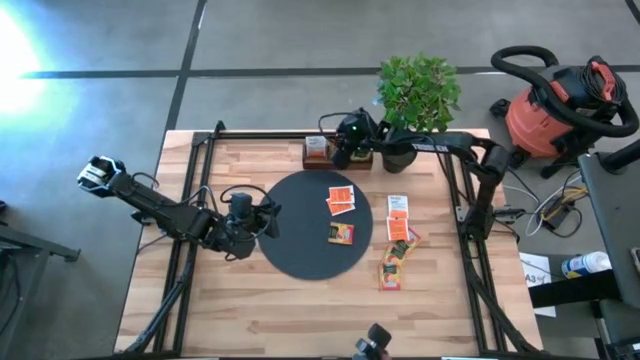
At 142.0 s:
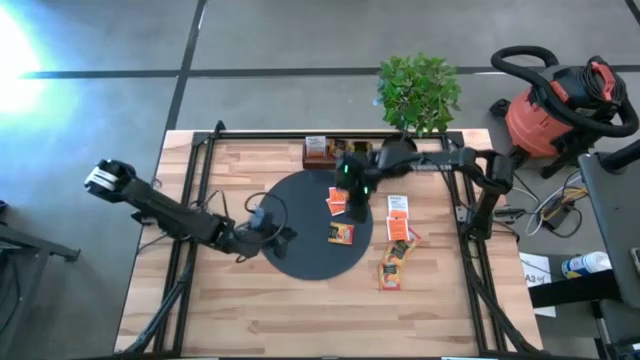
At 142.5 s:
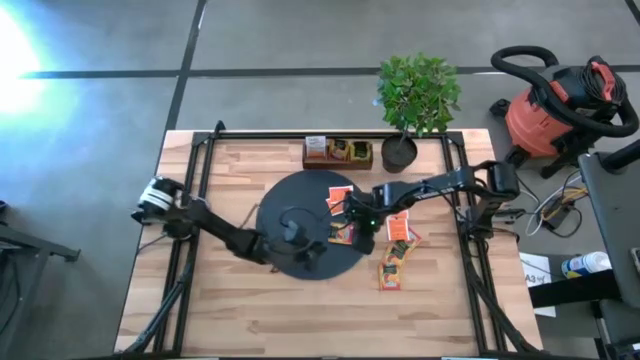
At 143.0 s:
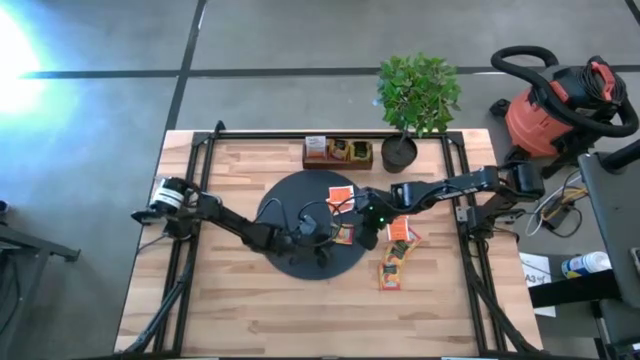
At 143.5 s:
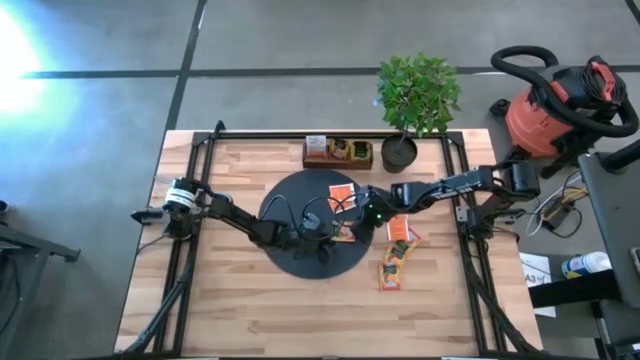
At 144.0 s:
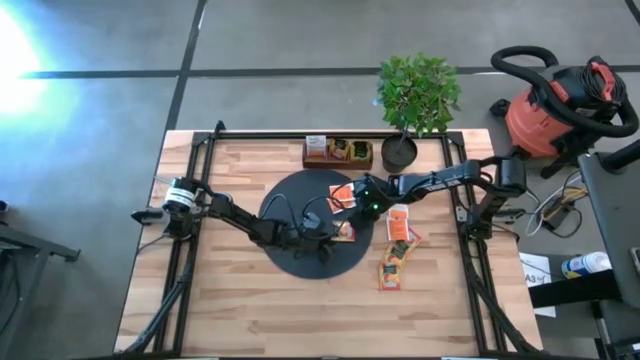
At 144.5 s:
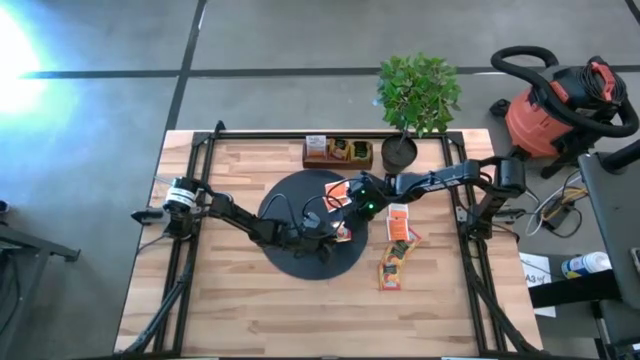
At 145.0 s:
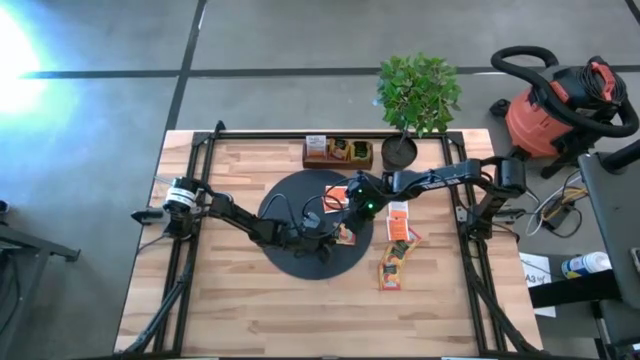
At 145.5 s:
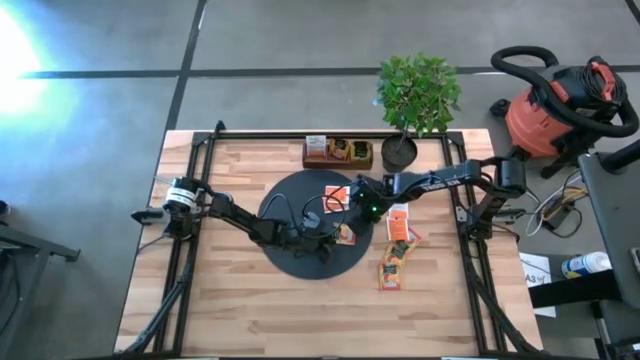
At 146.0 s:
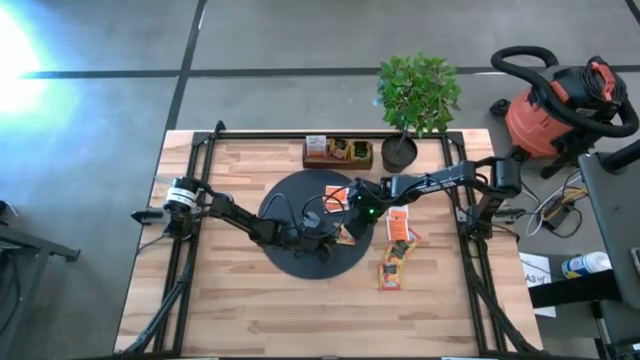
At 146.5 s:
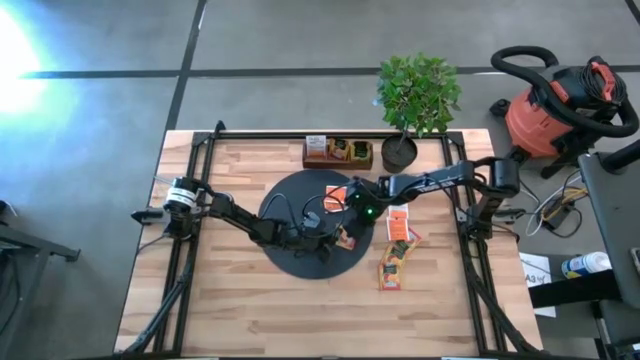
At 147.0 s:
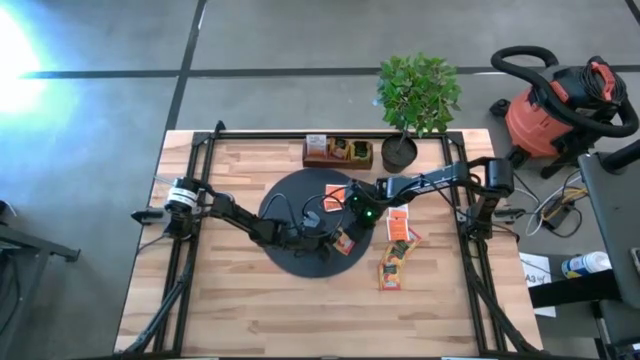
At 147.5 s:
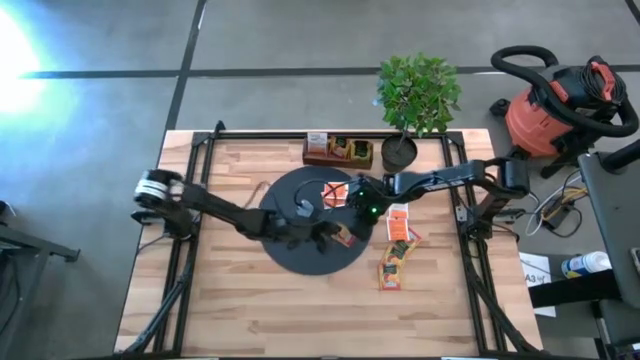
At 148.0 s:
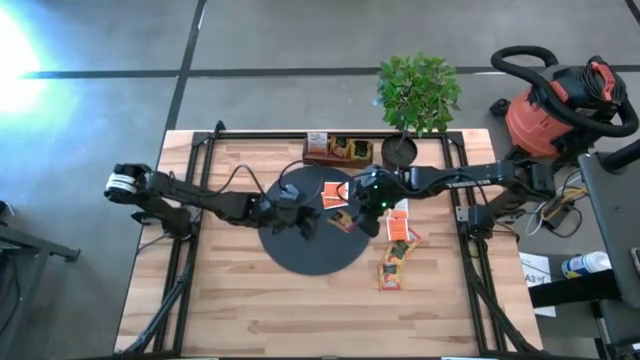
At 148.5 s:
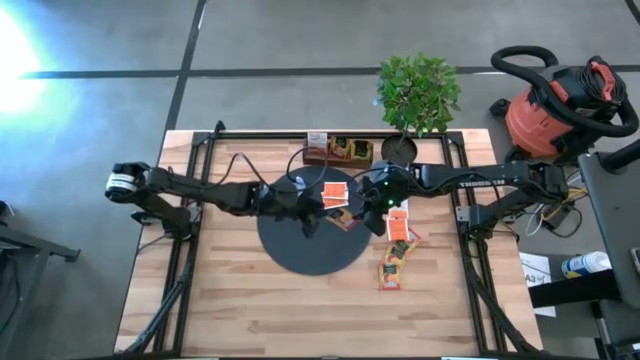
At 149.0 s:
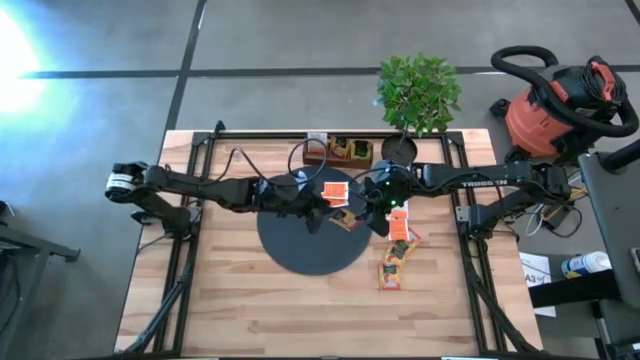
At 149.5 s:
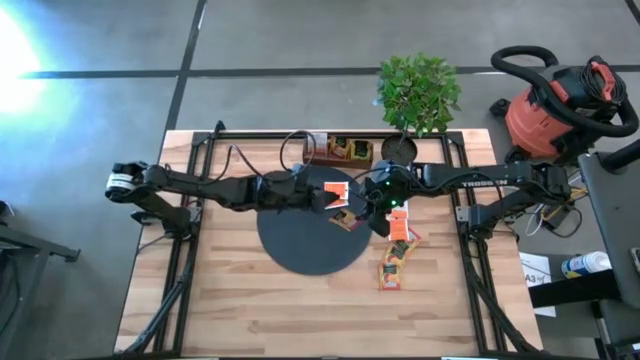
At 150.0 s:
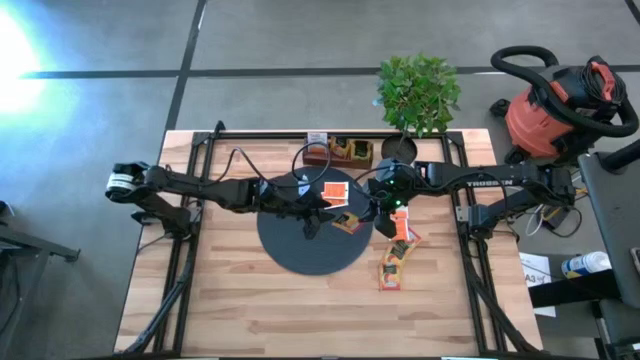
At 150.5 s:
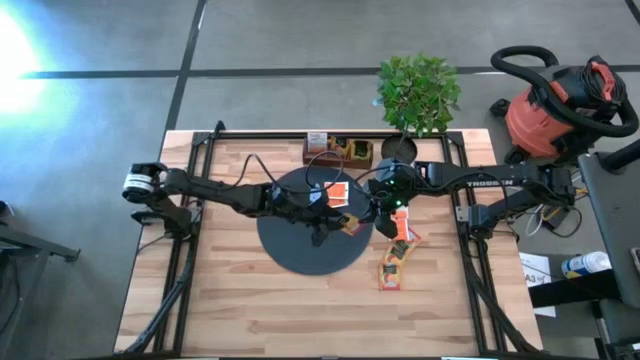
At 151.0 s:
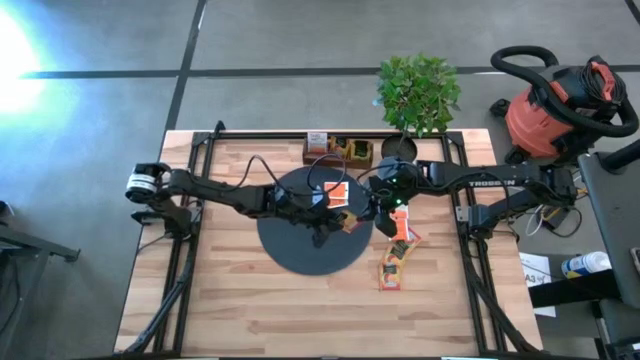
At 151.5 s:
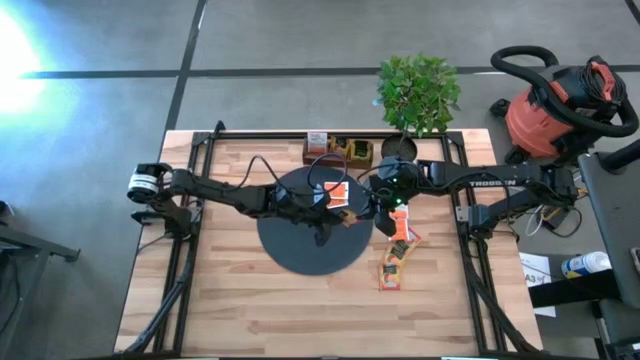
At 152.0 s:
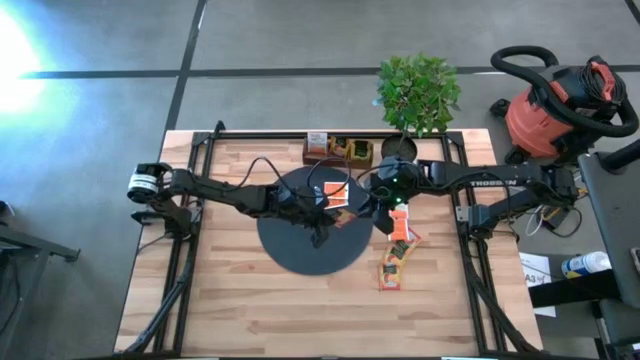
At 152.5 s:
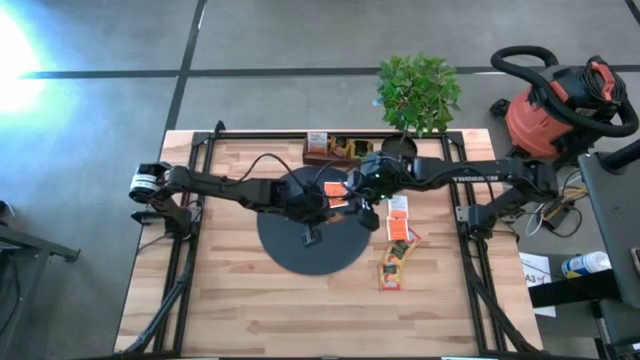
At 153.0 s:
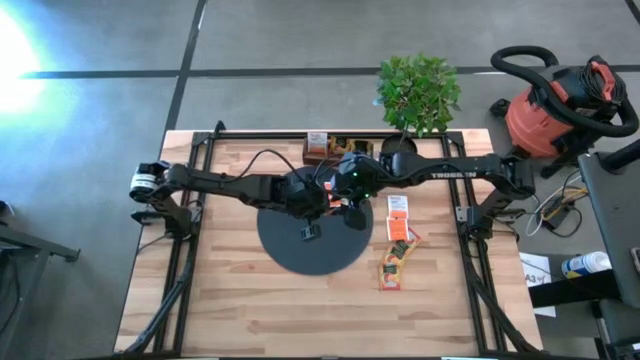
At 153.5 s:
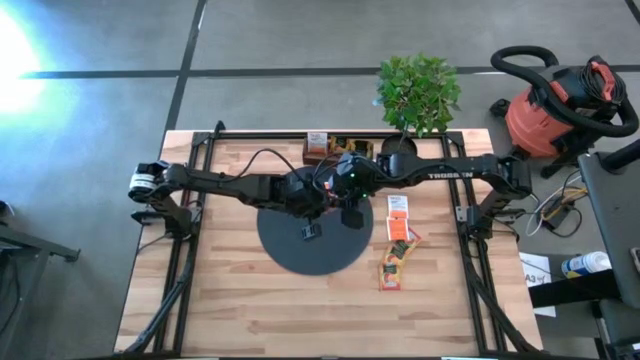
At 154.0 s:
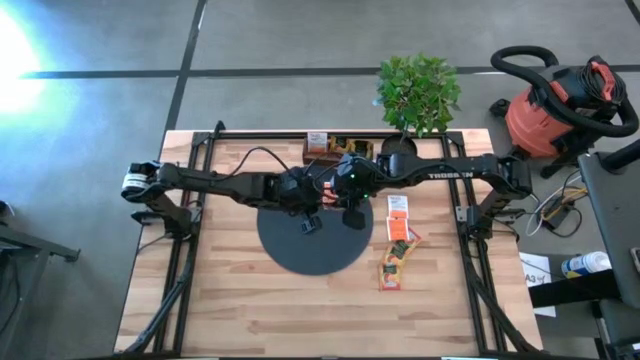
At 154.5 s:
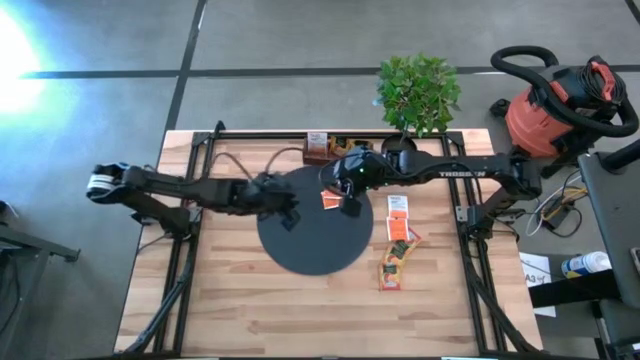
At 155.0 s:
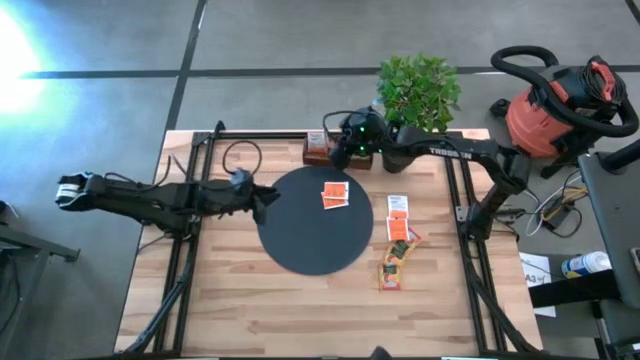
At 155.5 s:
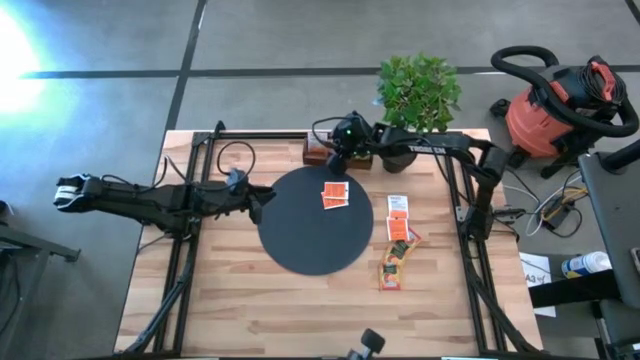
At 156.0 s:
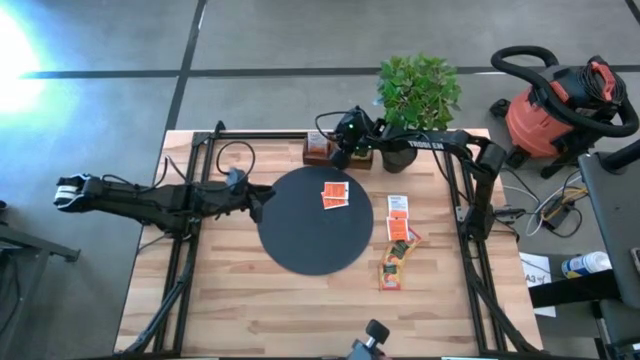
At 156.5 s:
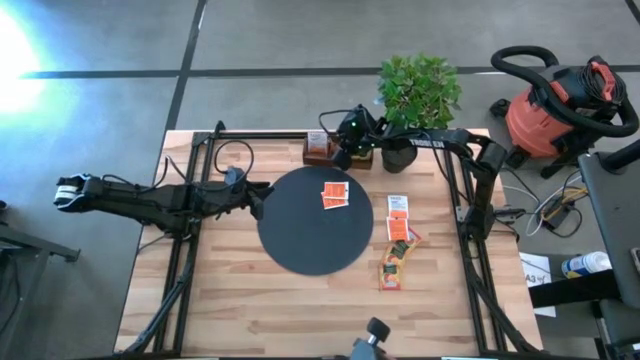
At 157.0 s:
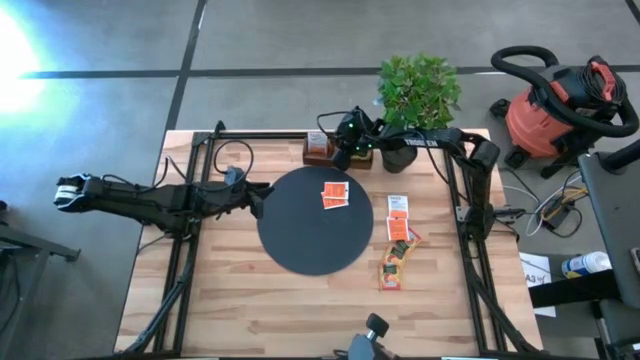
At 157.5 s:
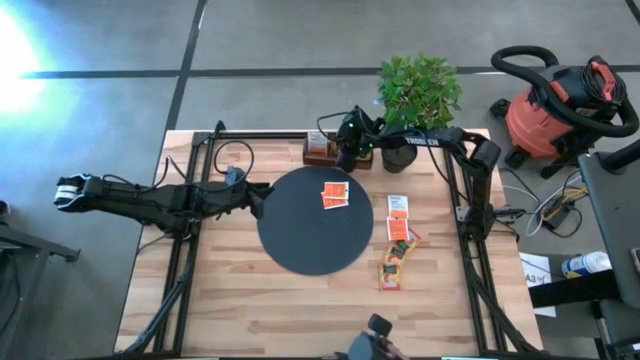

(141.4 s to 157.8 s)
Task: Pick & Place Tea
Put the orange tea bag into the middle section of the brown wooden organizer

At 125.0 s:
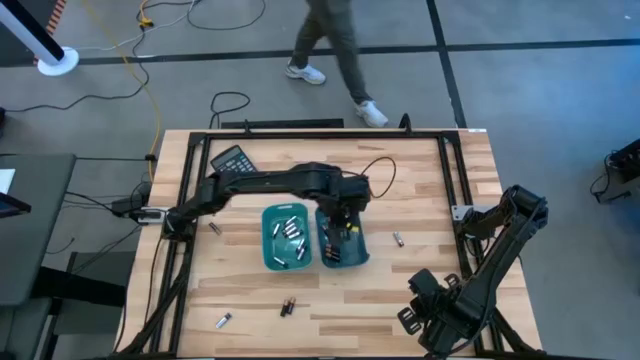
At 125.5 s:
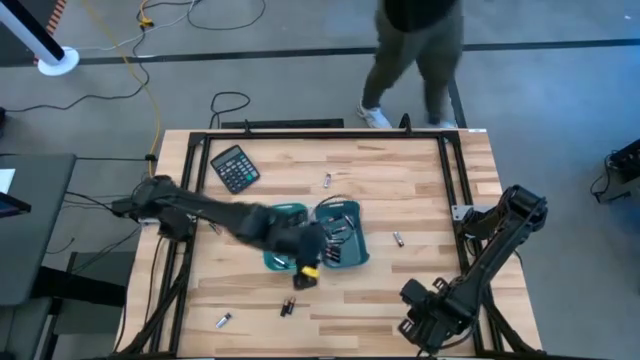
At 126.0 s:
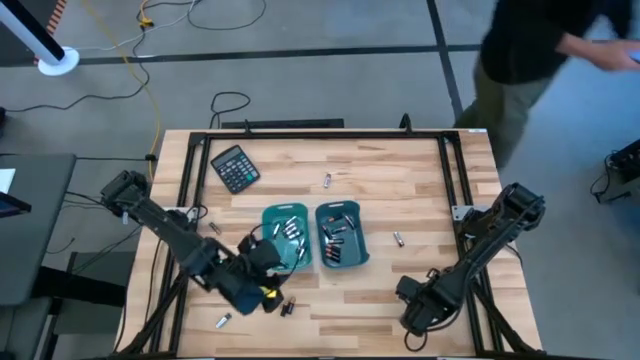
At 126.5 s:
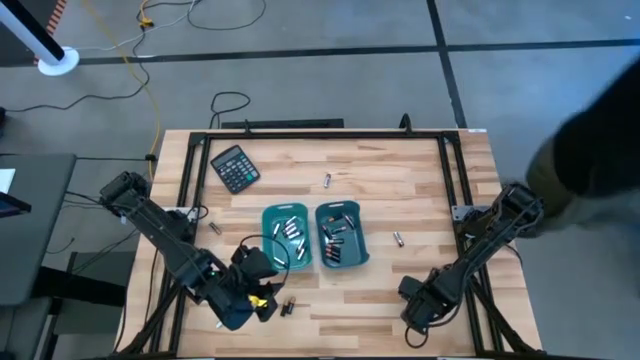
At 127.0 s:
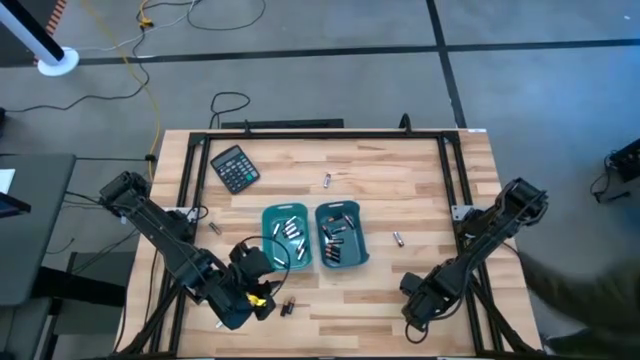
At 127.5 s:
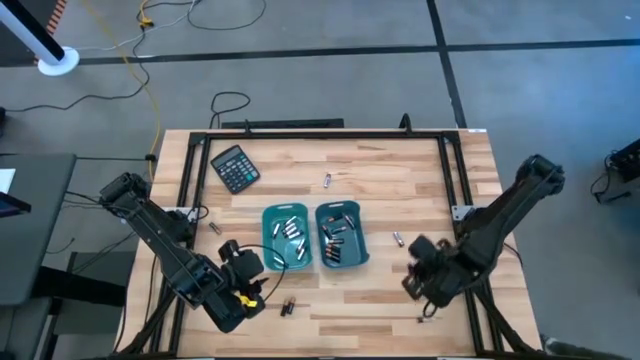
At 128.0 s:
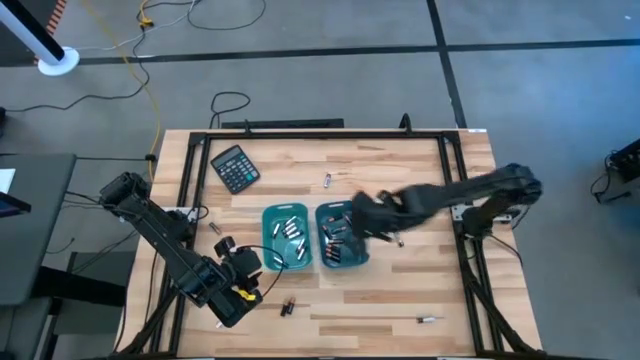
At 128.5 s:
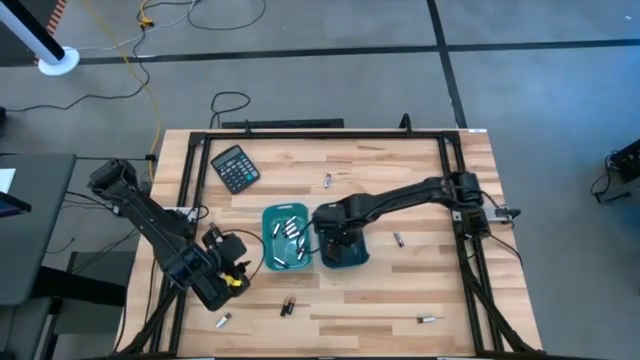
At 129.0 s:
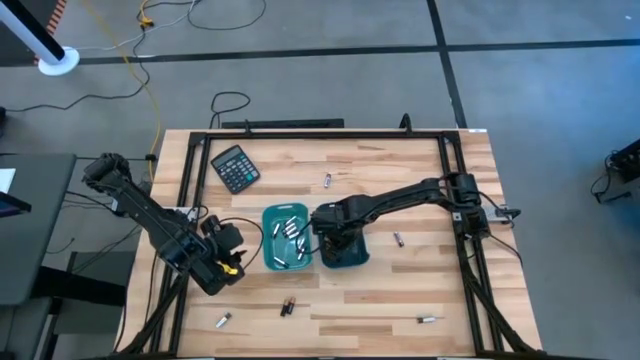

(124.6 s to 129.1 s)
Task: Sort batteries
Put the black battery into the blue bin
